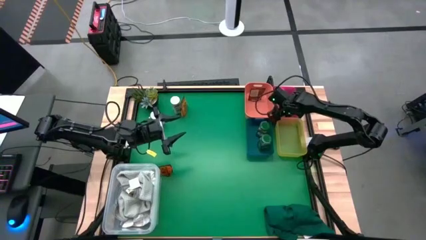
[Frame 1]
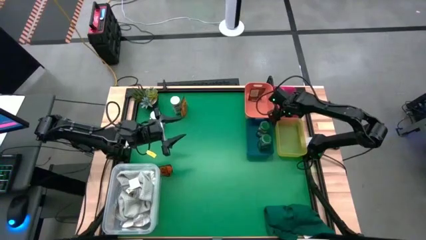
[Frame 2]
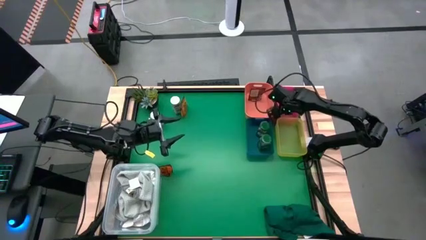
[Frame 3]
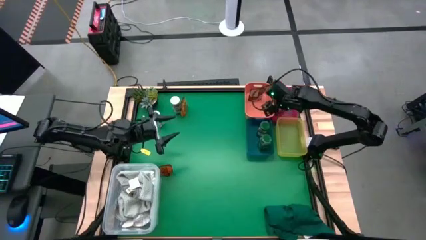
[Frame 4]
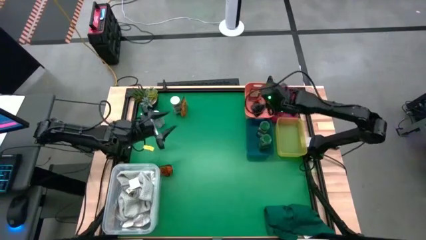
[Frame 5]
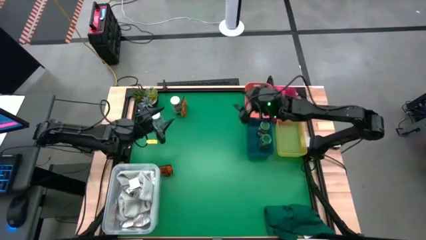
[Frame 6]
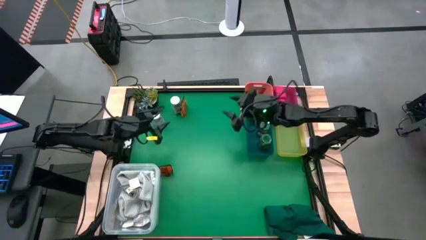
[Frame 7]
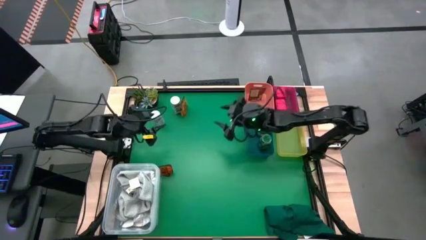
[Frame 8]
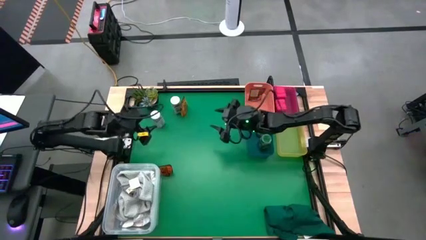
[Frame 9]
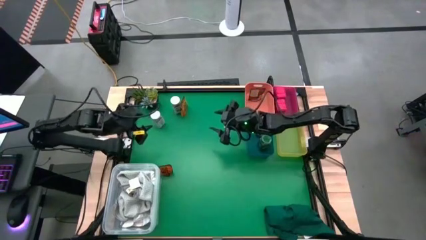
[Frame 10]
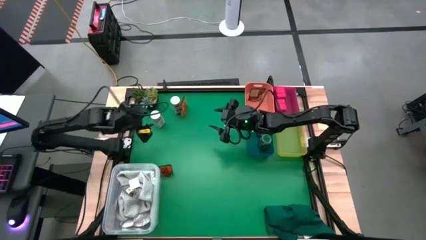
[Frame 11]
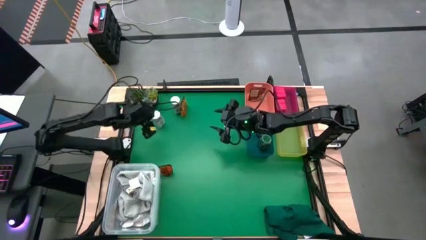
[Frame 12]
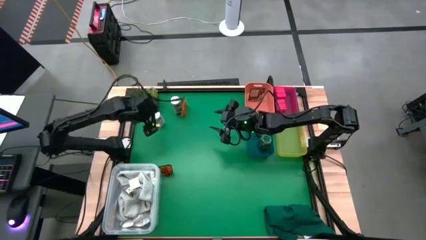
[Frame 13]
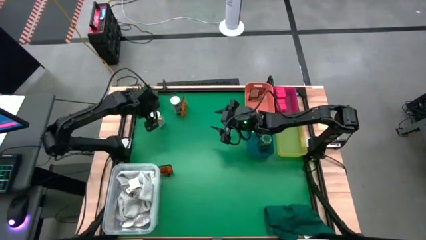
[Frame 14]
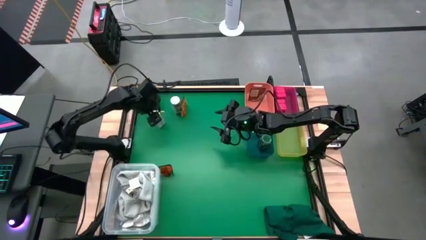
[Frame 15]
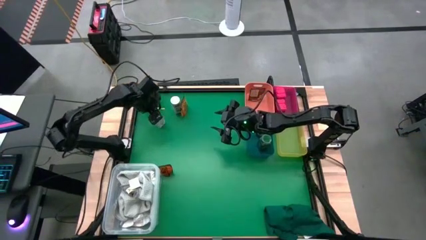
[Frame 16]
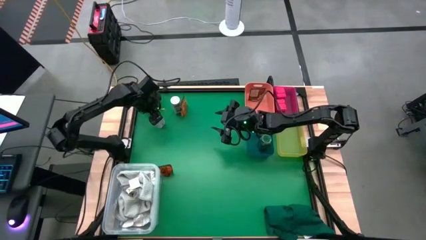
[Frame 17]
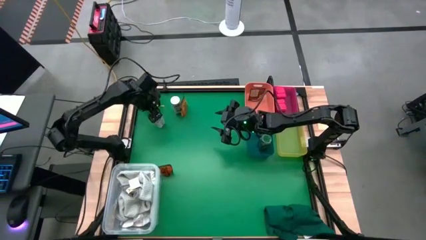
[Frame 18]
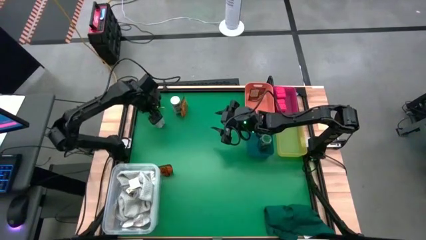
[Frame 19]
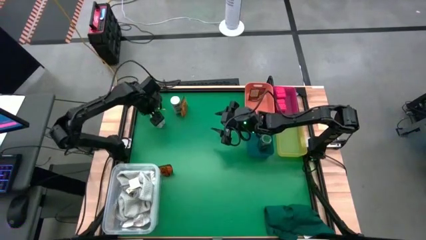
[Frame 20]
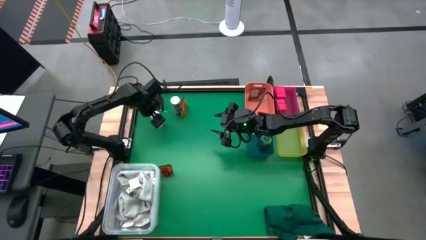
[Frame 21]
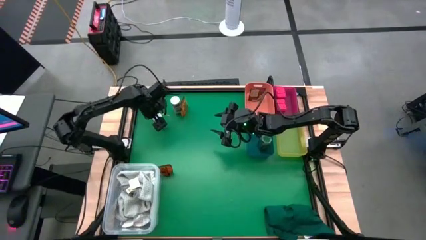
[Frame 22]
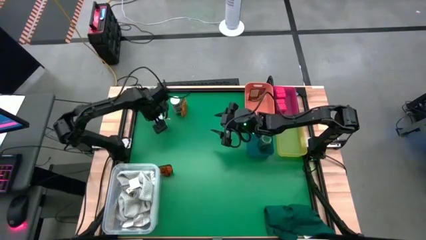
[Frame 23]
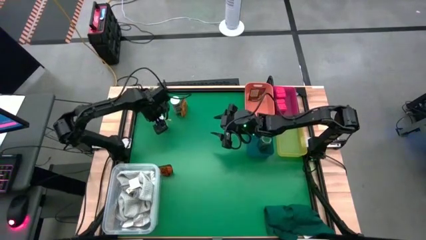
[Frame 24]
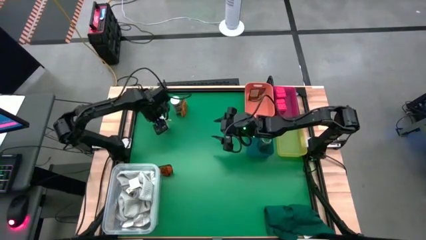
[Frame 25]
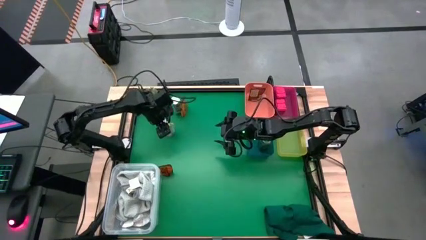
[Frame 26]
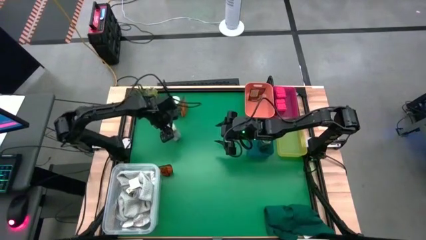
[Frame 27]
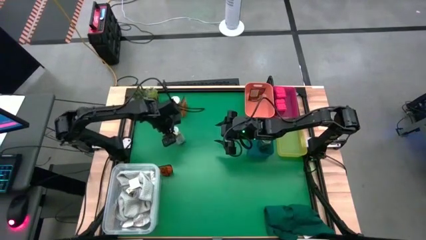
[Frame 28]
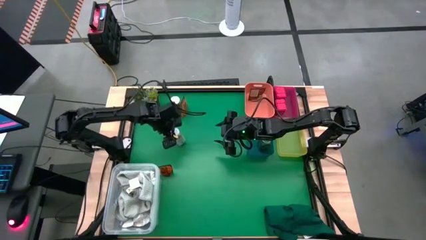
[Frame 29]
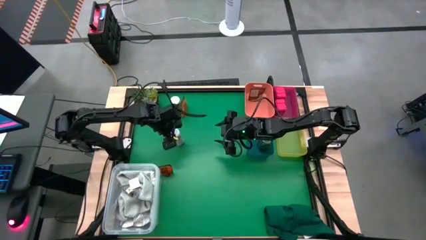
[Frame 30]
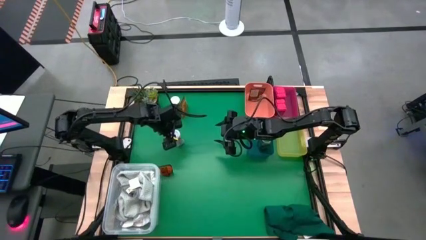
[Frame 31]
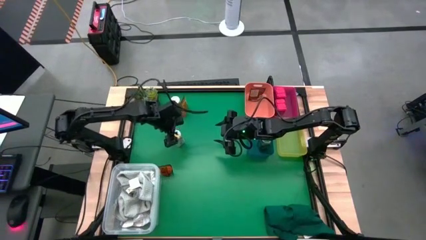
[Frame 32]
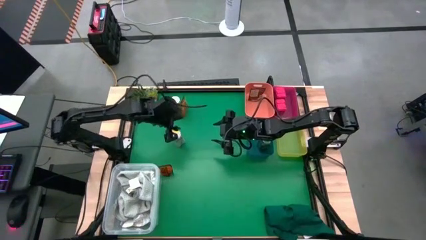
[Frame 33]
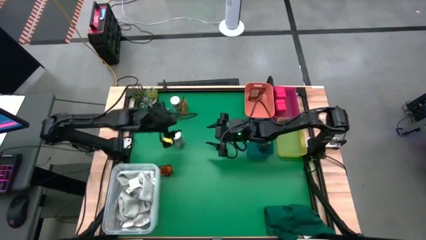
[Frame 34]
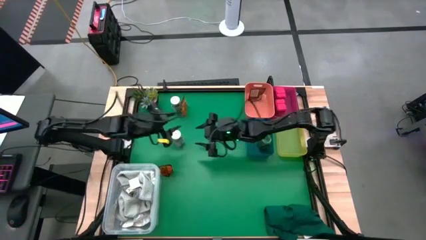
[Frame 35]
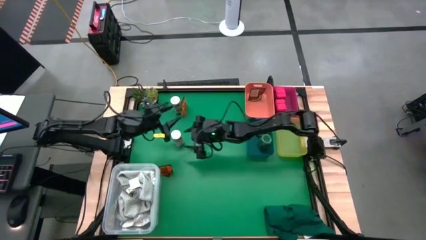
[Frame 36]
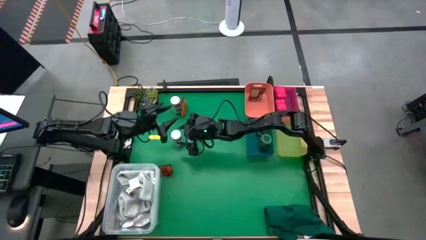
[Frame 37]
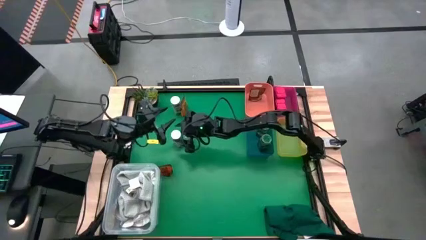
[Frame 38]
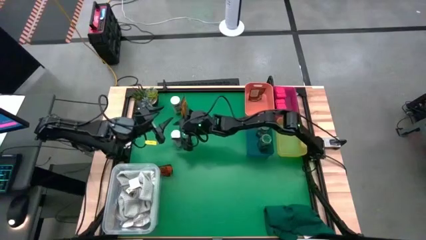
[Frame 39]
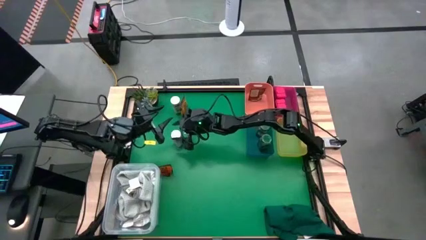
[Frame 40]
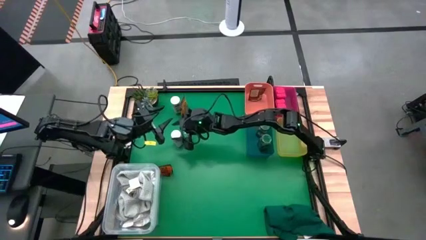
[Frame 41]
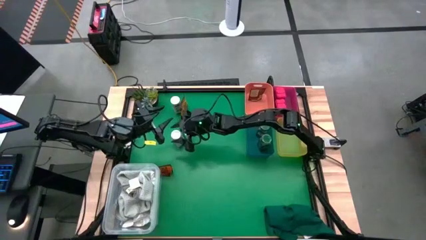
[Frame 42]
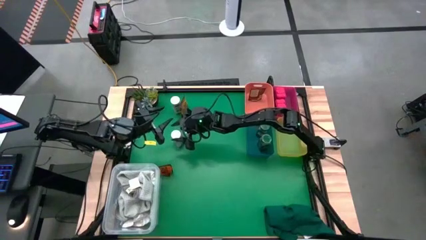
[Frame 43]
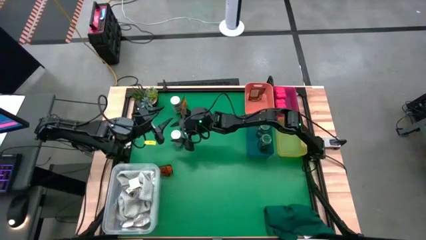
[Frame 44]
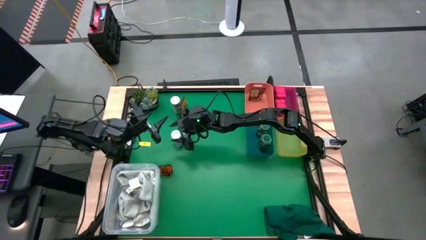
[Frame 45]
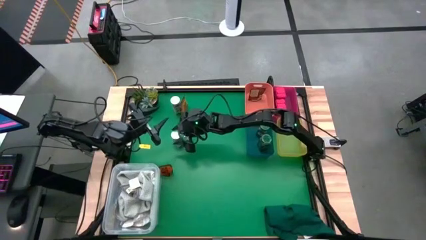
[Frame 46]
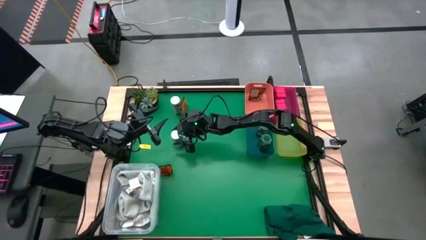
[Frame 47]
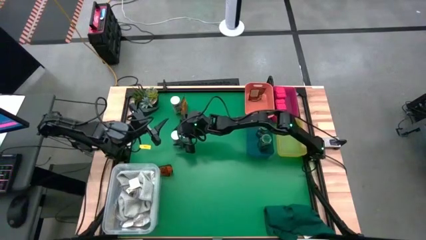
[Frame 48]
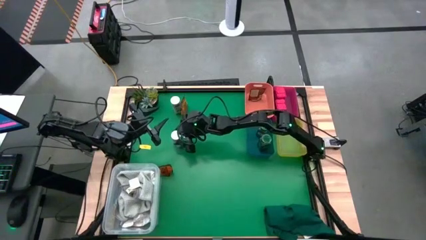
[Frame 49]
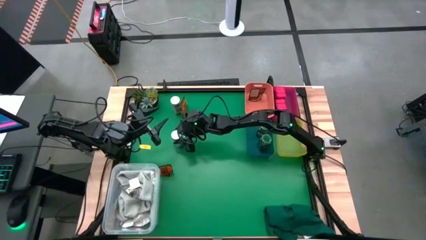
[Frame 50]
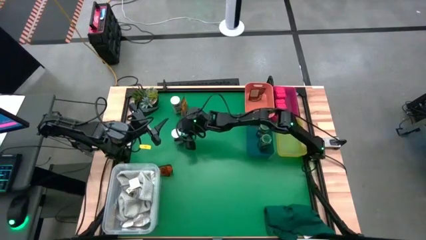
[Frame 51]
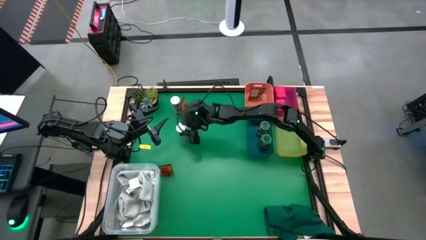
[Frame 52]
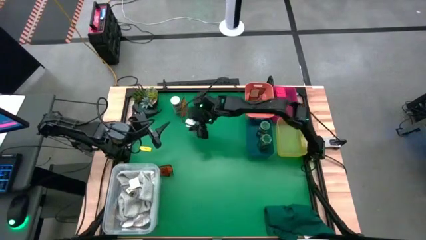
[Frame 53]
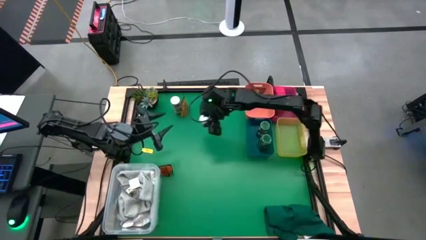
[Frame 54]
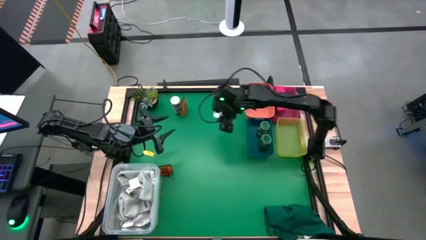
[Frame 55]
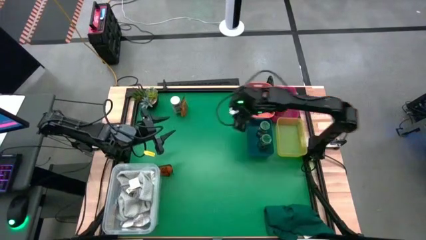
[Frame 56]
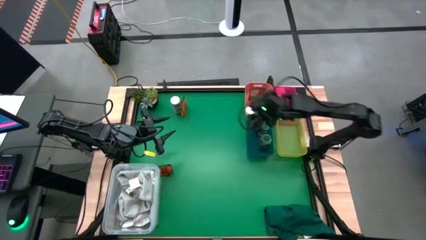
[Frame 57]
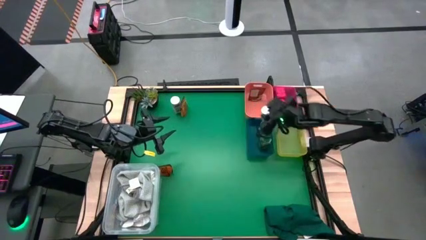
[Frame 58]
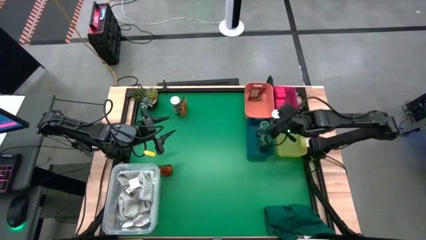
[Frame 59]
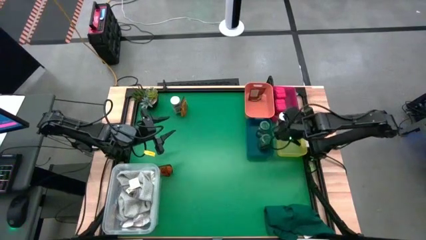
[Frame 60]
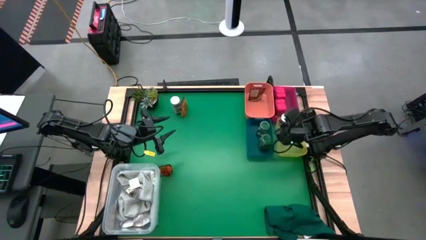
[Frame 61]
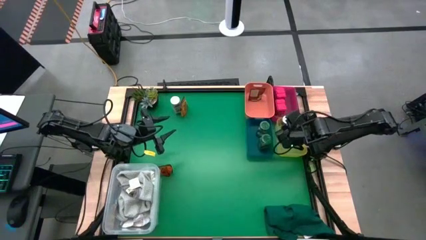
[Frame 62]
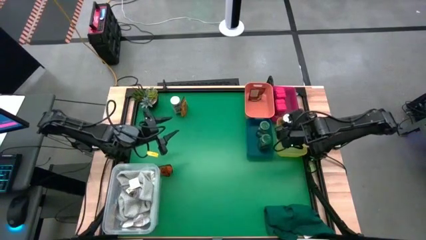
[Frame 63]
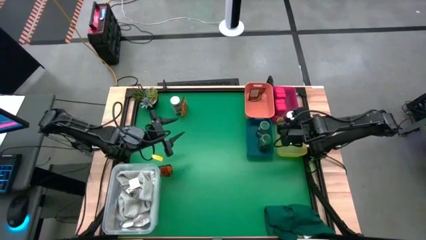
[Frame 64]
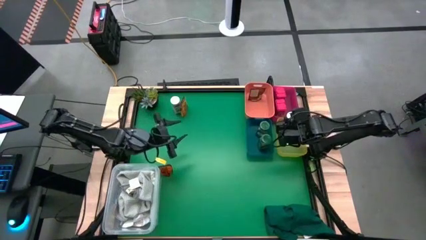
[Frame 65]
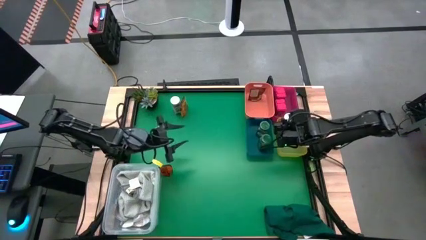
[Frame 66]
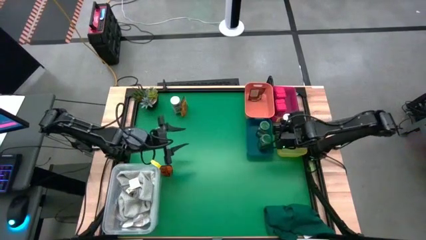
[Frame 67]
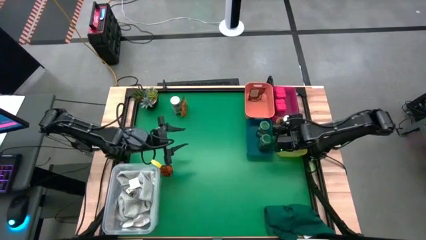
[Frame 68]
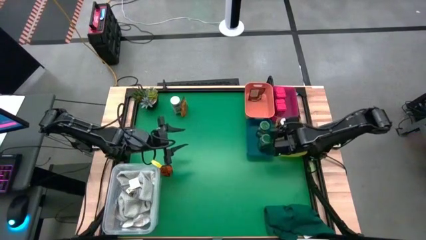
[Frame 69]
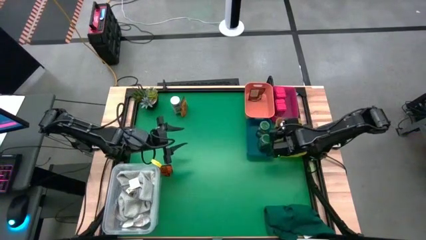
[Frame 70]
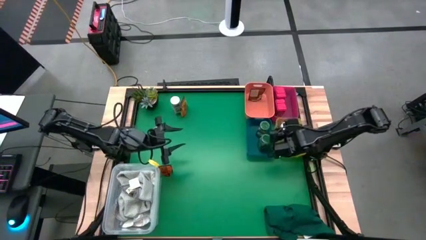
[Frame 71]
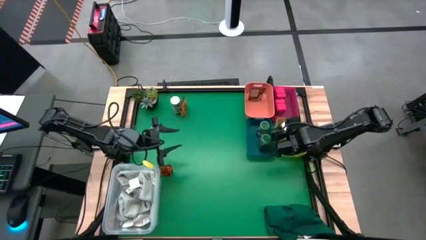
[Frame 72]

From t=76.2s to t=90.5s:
Task: Sort spices by type
Put the left white seasoning bottle into the yellow bin

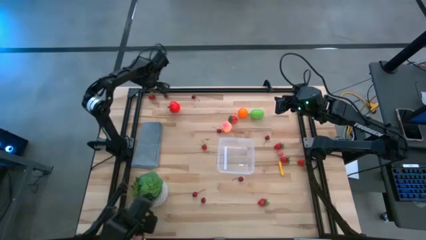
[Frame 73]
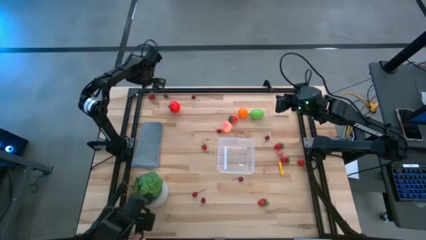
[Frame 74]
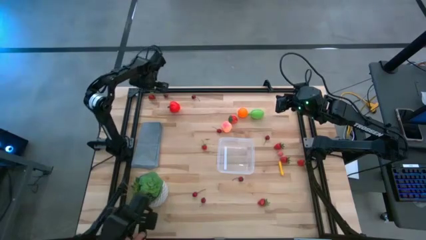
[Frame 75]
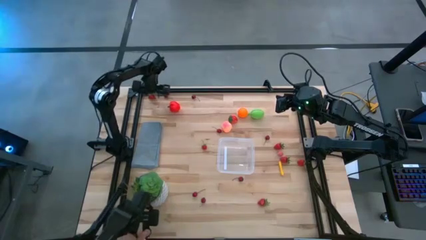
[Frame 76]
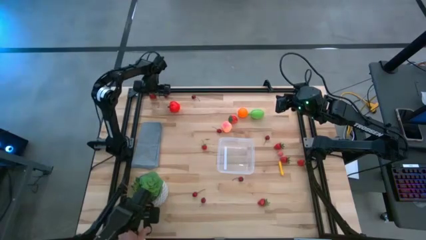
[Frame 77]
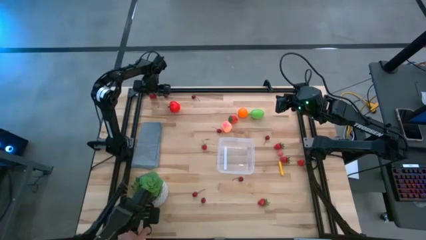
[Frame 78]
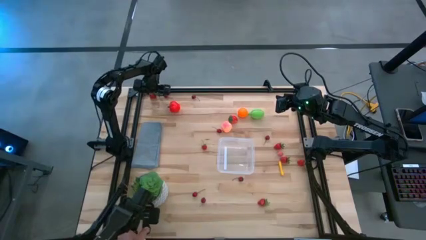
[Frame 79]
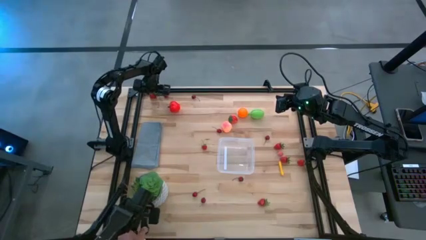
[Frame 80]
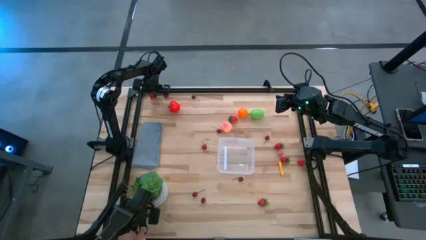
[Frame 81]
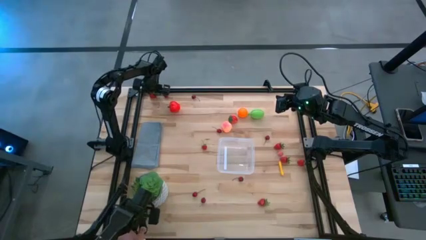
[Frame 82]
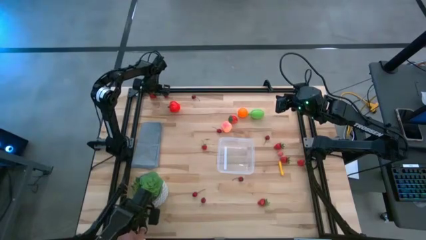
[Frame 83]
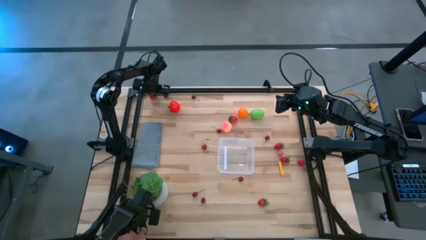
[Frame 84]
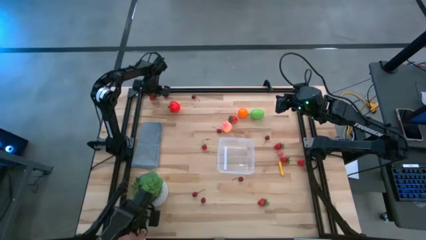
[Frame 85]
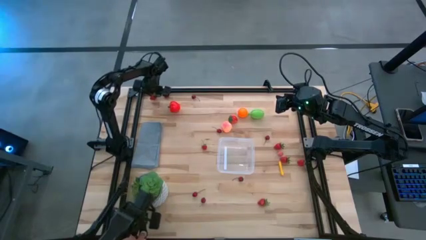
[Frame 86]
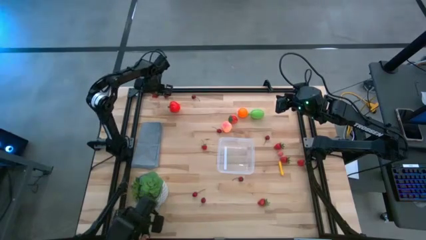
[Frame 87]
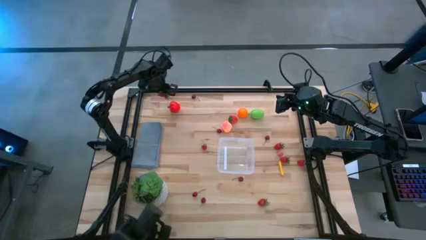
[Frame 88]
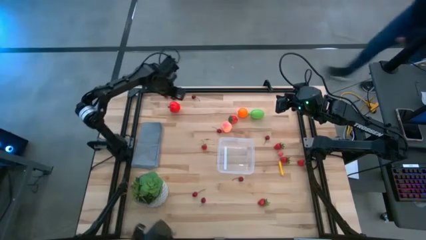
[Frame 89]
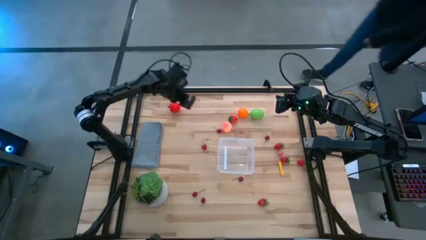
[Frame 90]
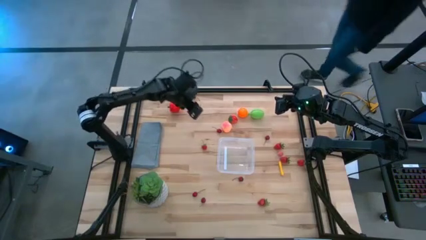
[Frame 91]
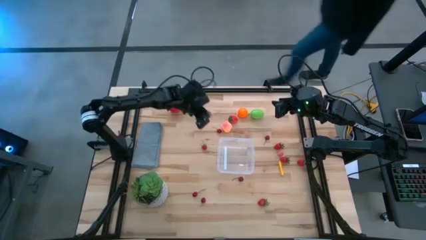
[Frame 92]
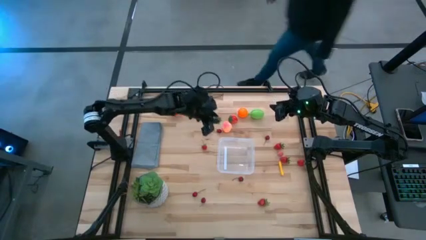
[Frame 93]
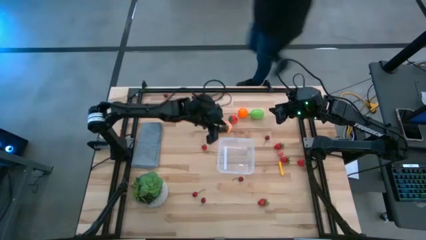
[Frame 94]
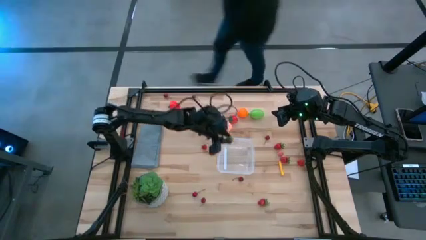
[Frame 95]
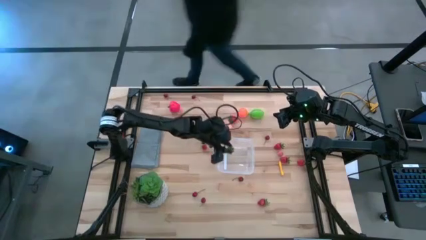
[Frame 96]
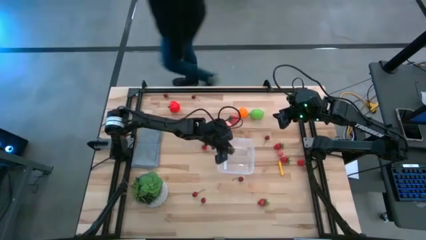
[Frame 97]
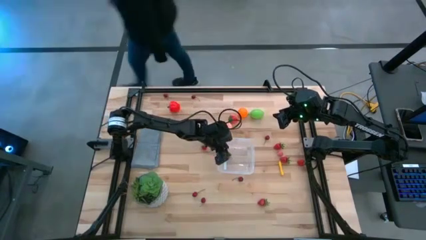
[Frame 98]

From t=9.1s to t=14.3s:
Task: Pick and placing Produce into tupperware
Put the strawberry into the transparent bin
